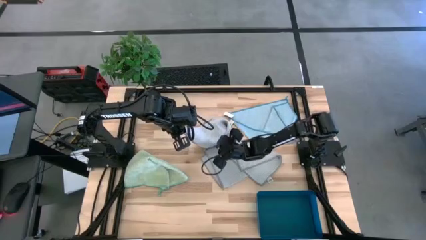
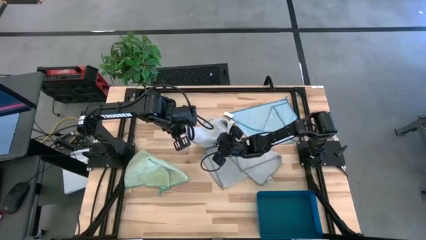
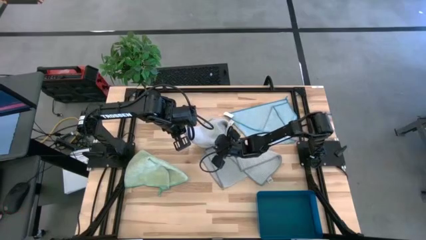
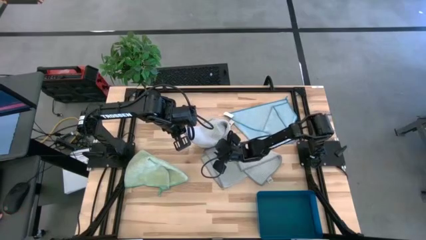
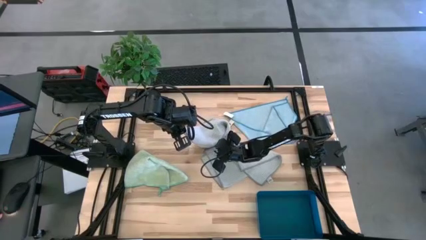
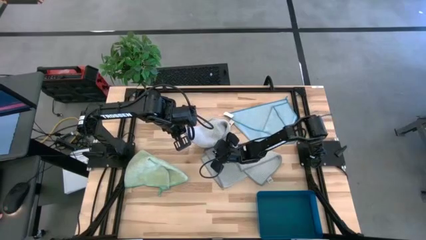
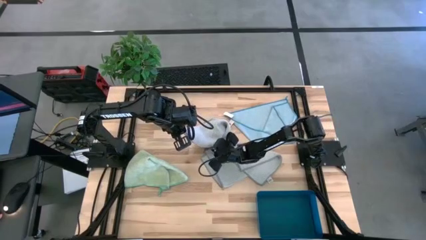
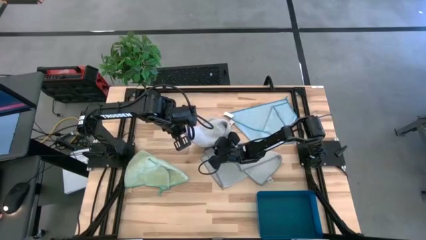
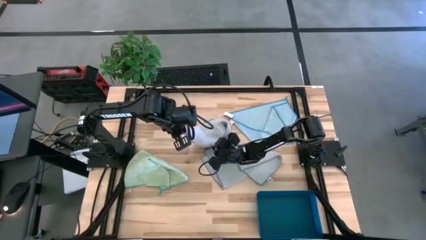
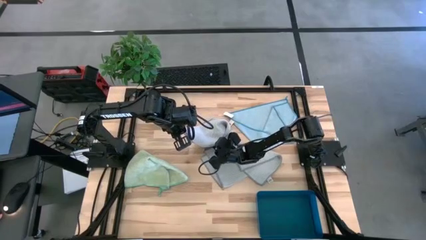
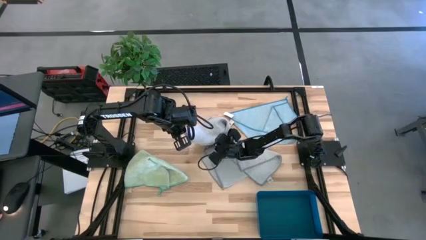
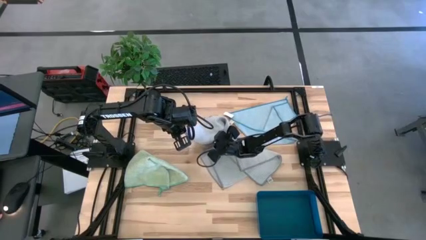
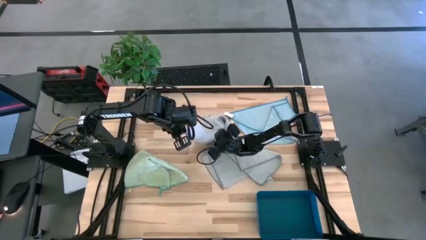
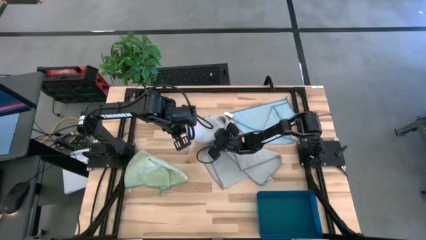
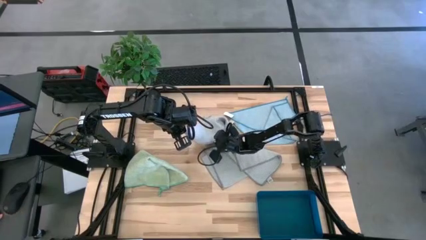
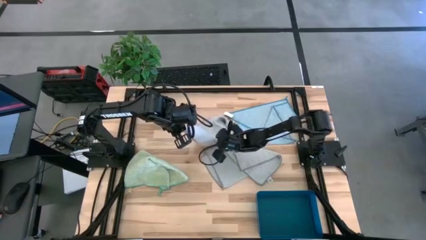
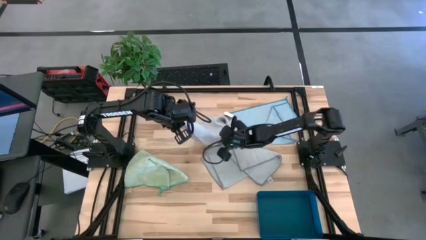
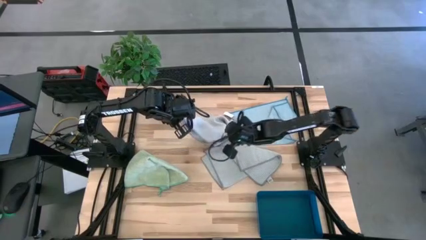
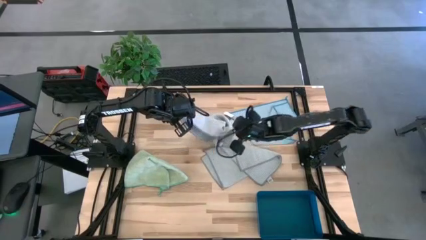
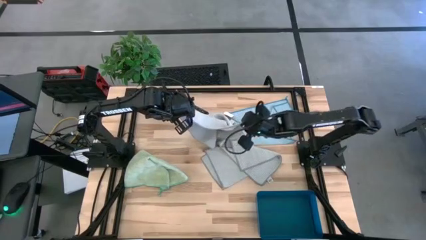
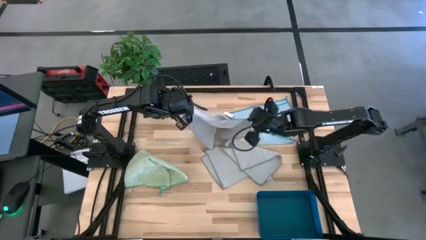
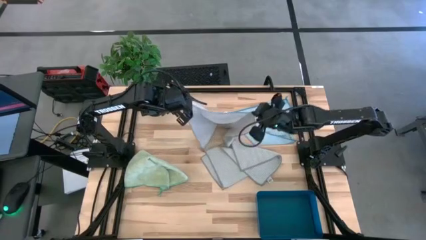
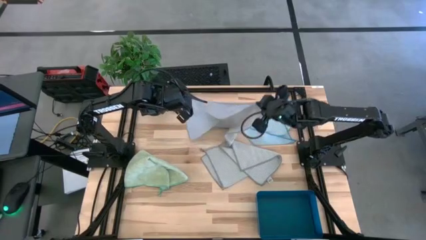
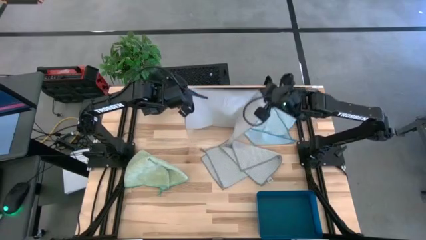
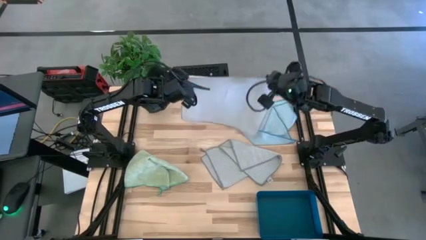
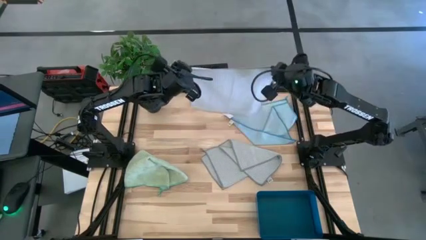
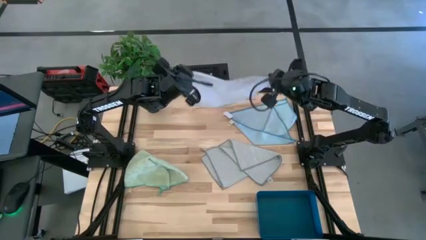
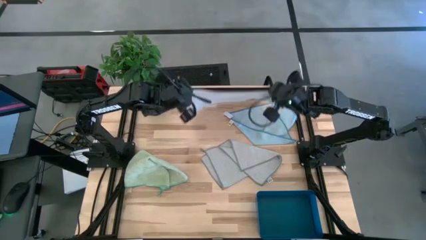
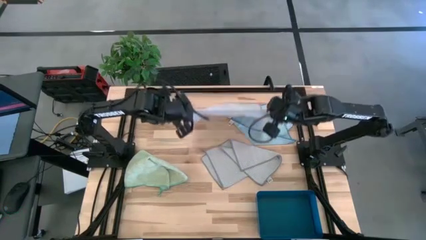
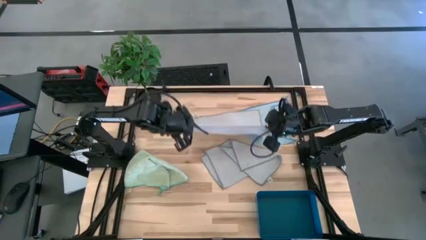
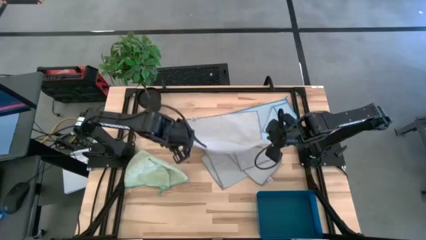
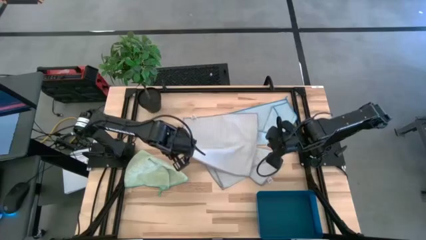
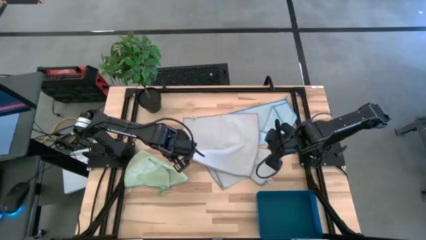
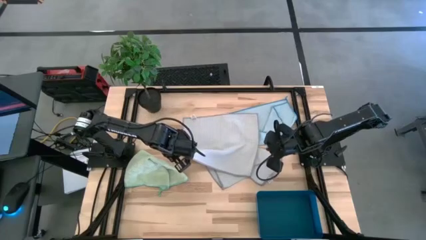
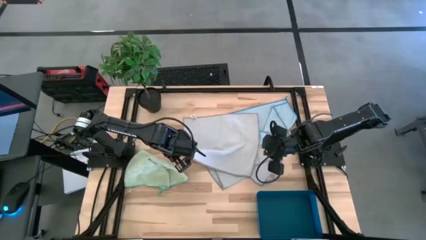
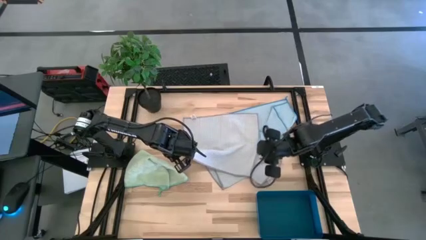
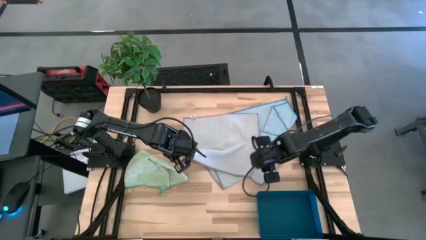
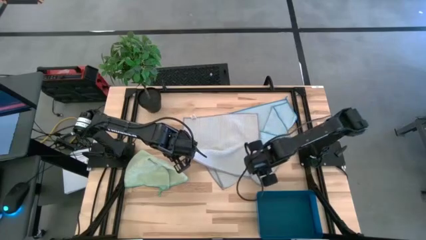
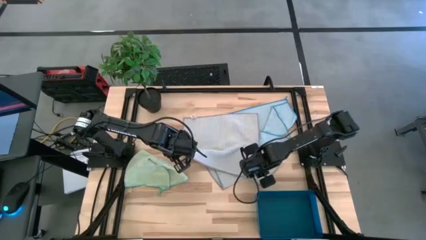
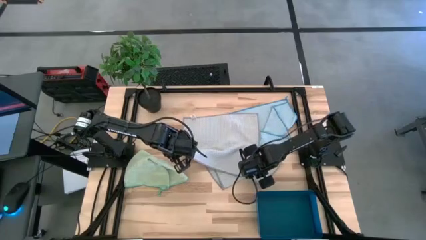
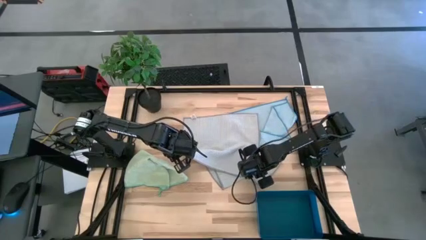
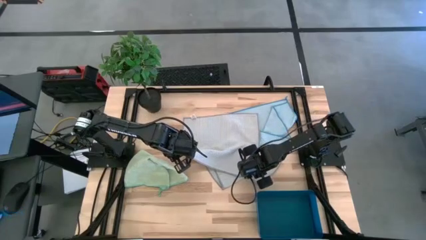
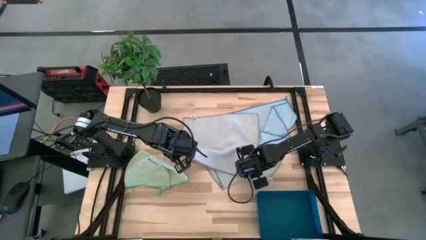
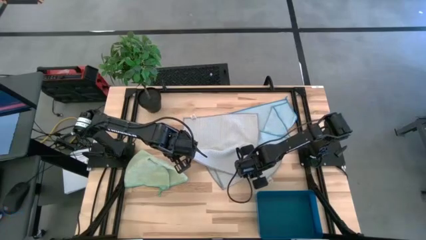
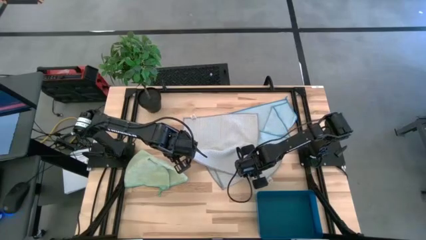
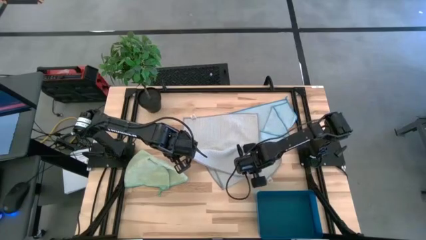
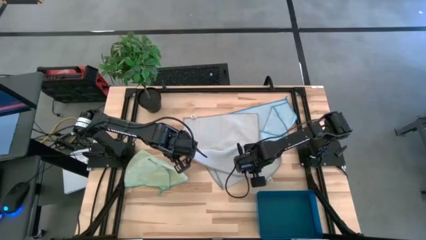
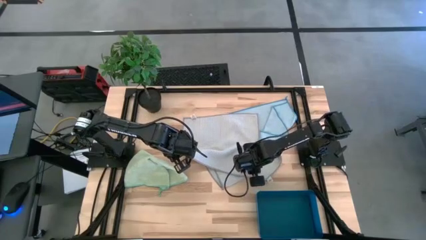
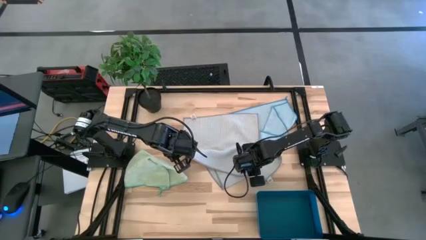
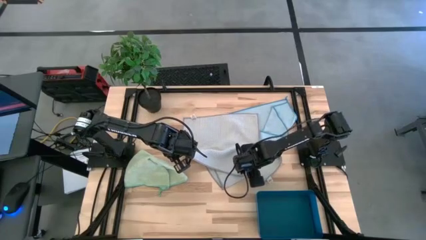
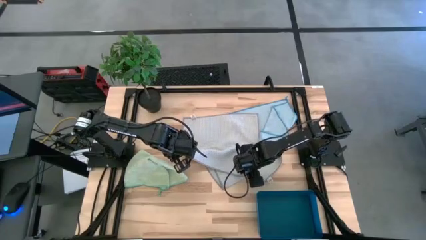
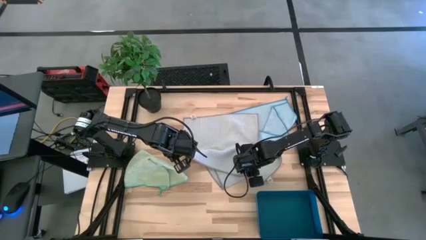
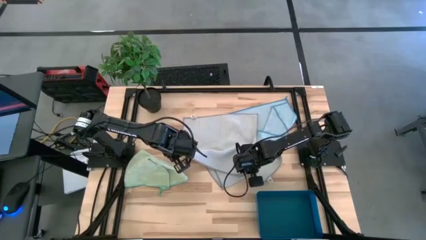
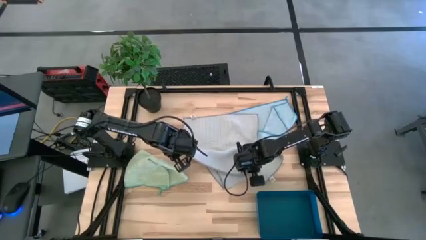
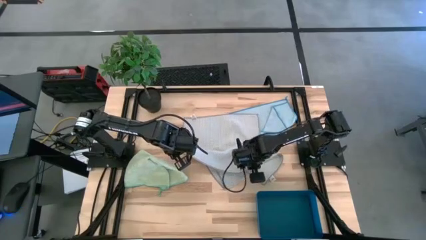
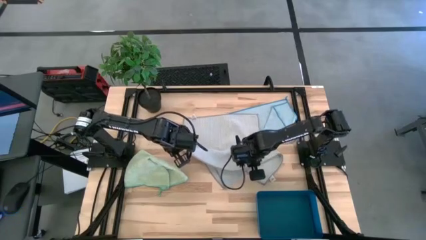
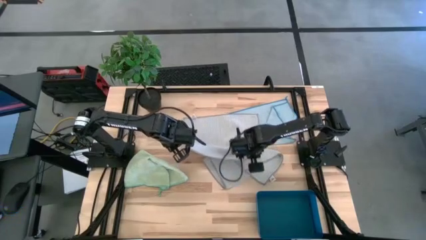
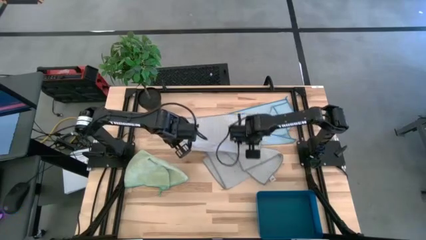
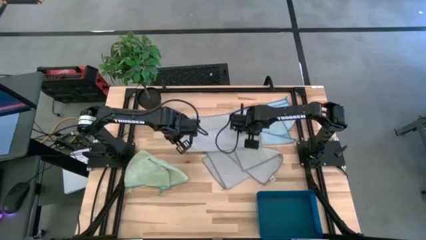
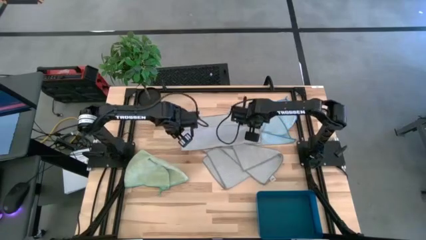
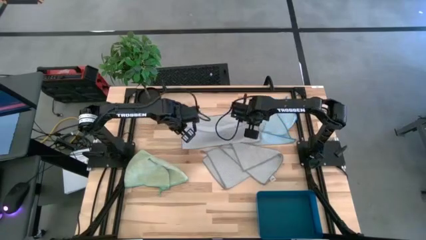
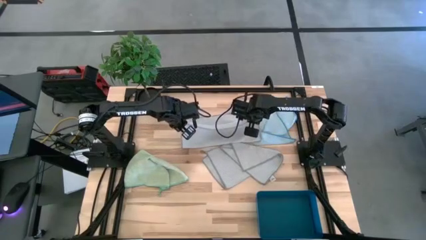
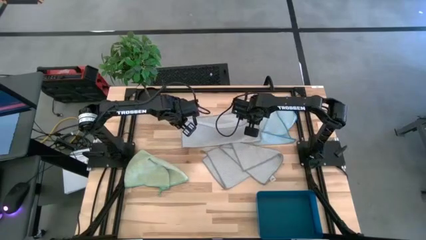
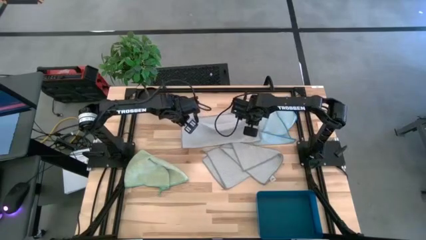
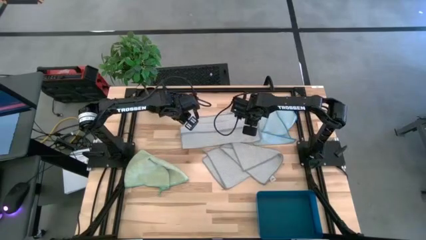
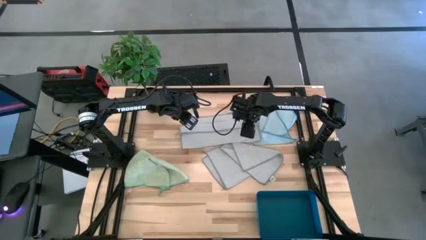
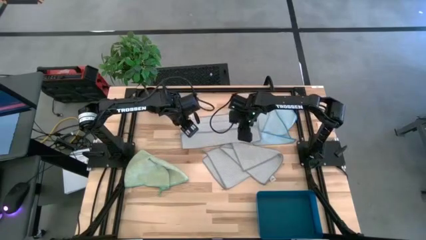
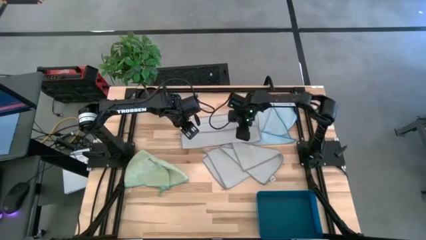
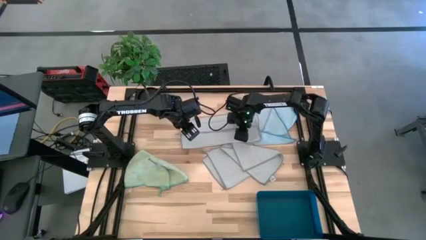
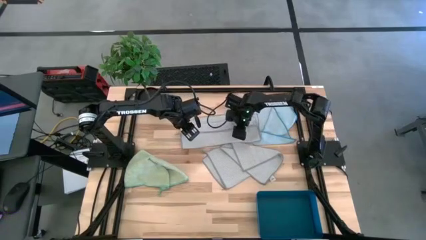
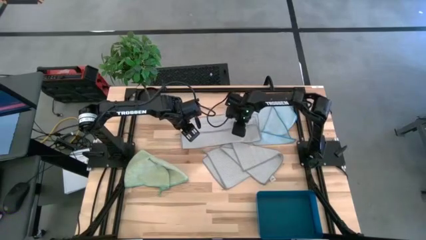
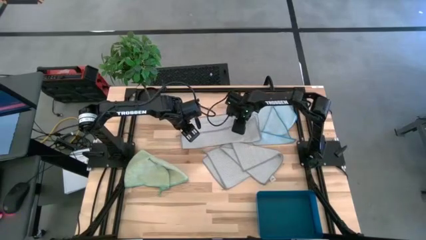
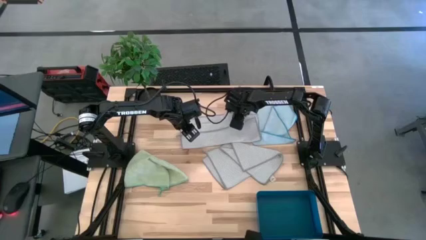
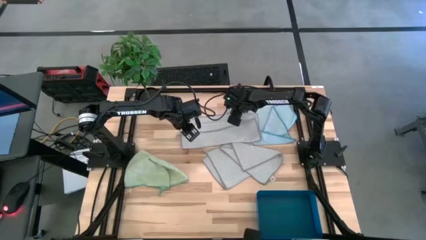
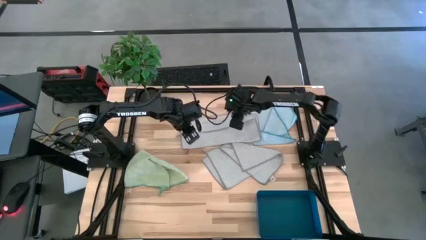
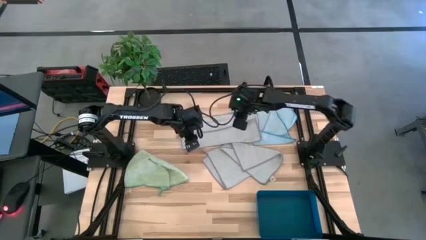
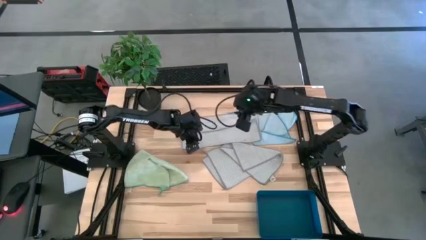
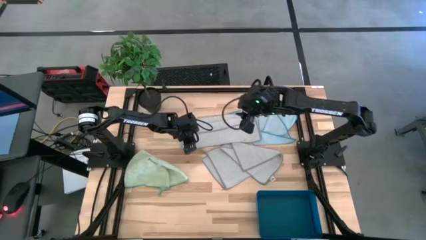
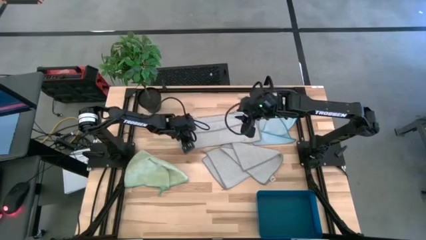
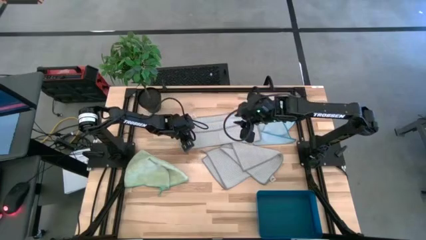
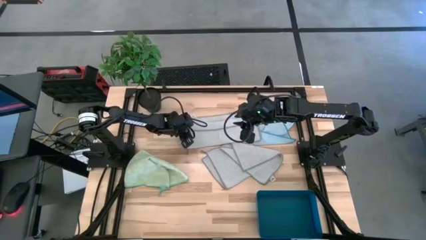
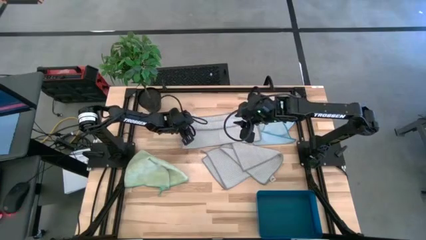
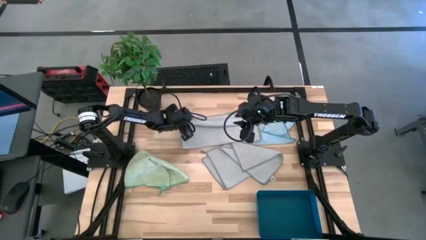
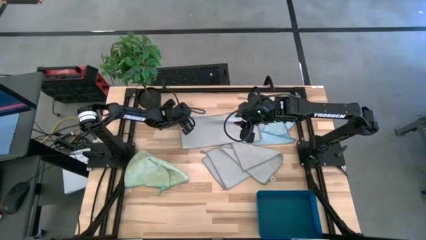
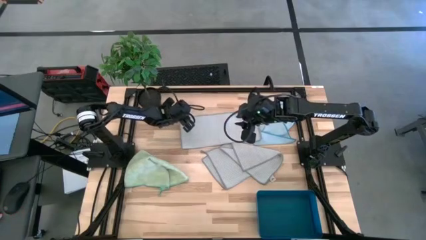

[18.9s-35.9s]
Task: Fold microfiber towels
Fold the gray microfiber cloth
